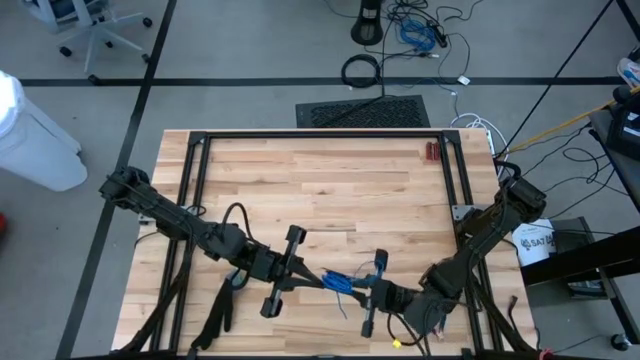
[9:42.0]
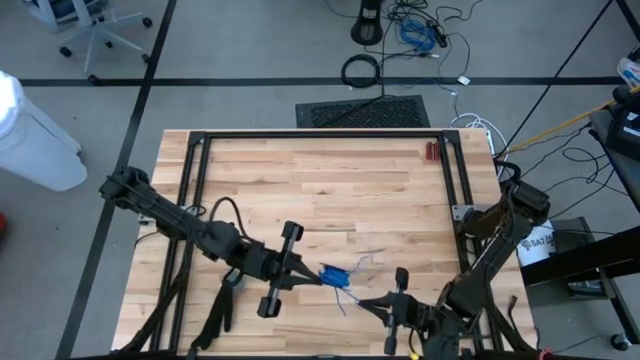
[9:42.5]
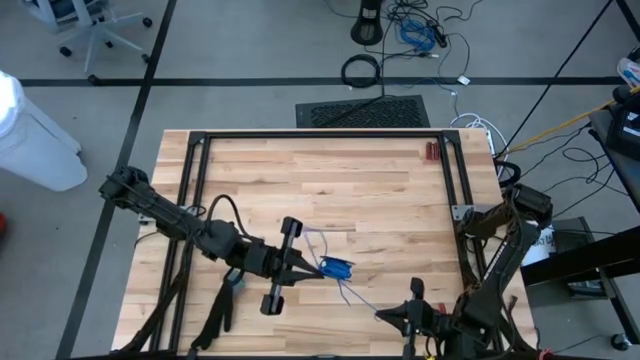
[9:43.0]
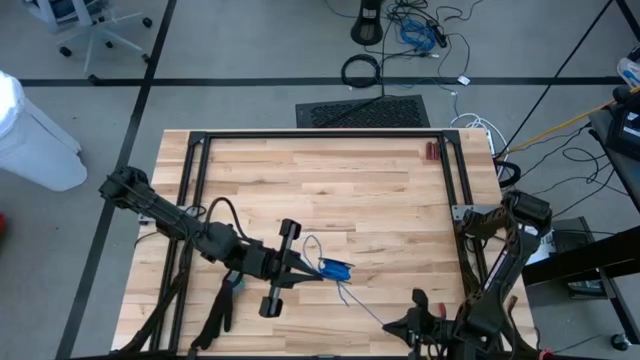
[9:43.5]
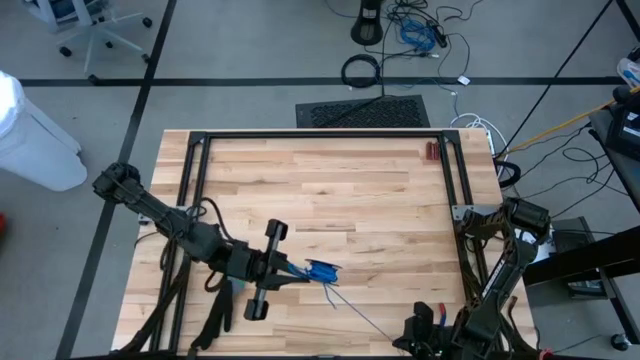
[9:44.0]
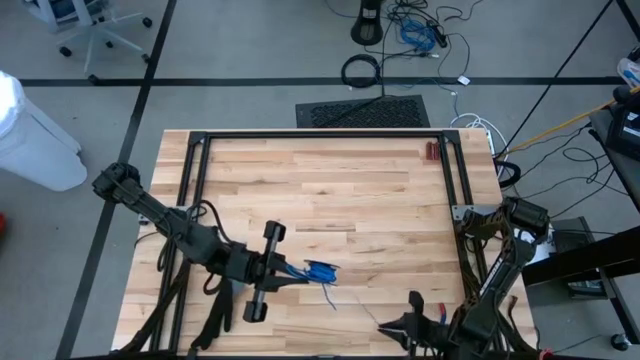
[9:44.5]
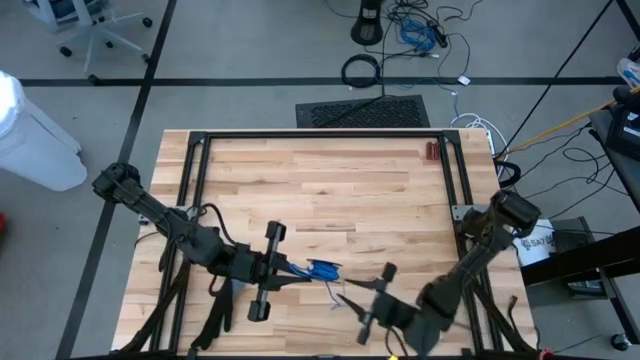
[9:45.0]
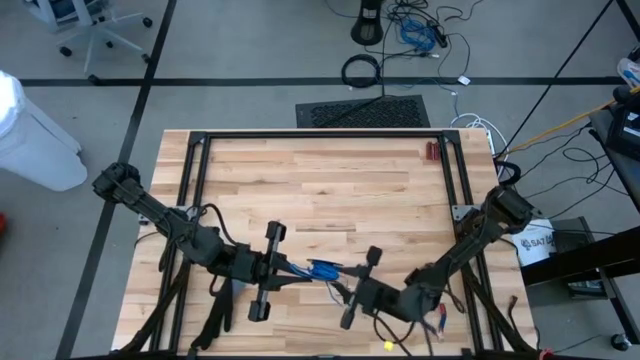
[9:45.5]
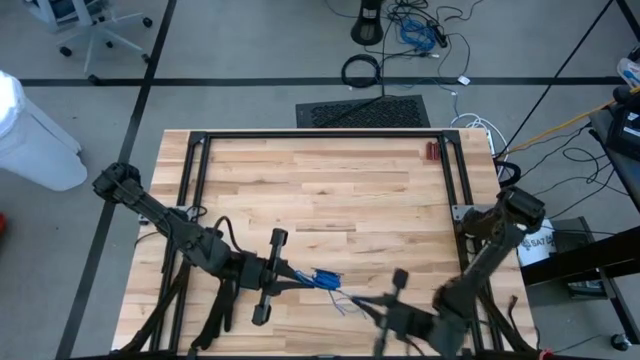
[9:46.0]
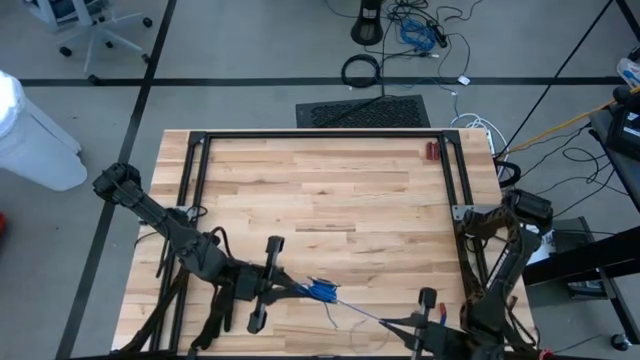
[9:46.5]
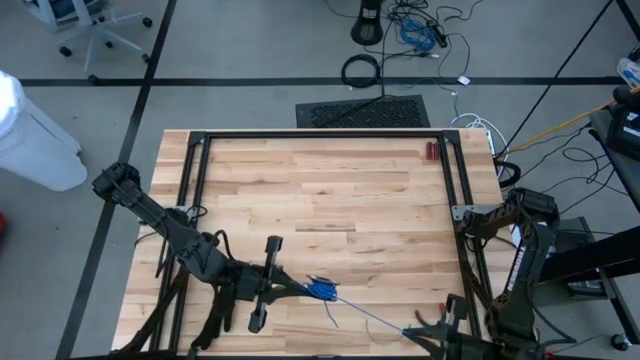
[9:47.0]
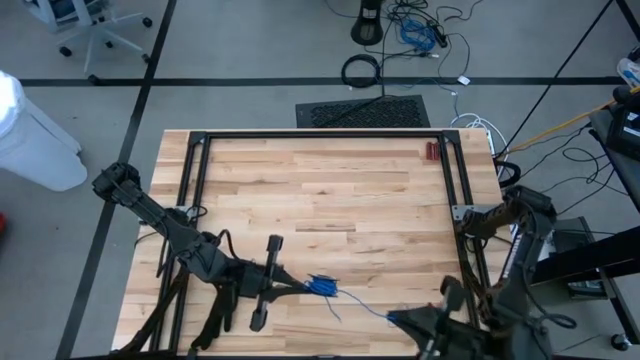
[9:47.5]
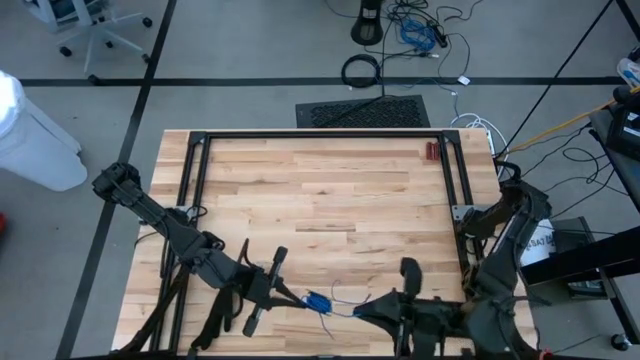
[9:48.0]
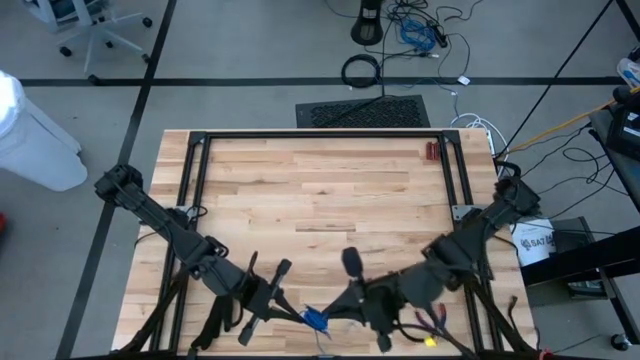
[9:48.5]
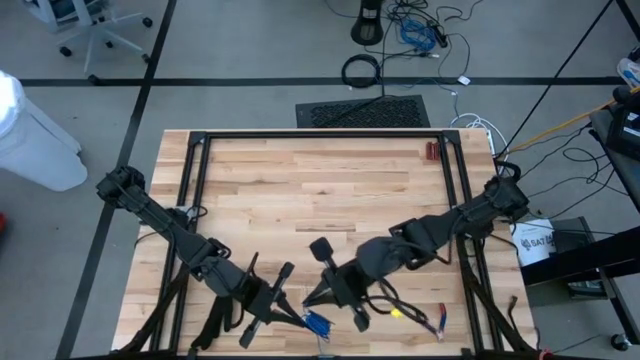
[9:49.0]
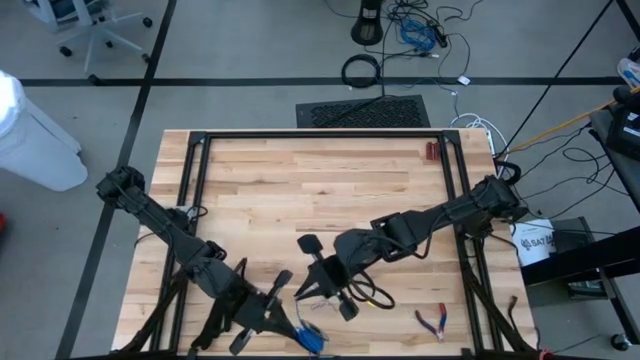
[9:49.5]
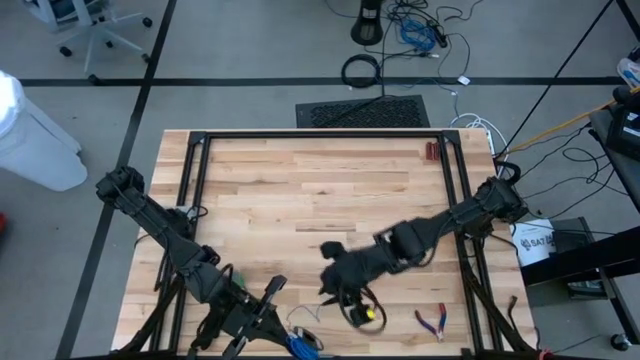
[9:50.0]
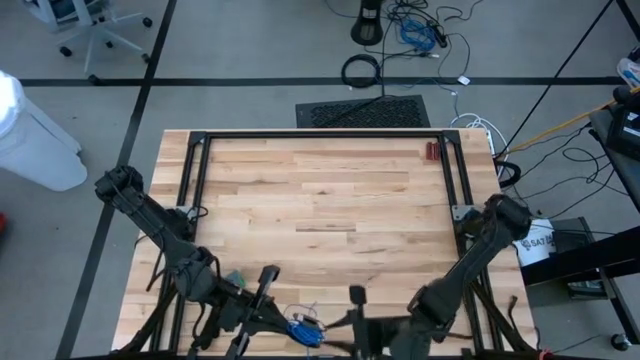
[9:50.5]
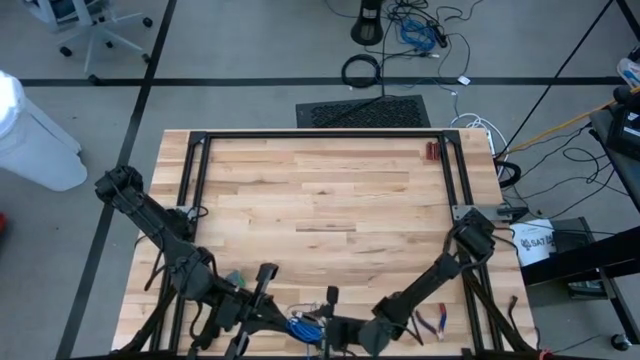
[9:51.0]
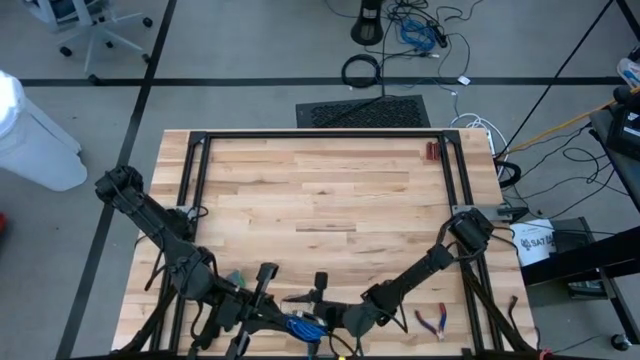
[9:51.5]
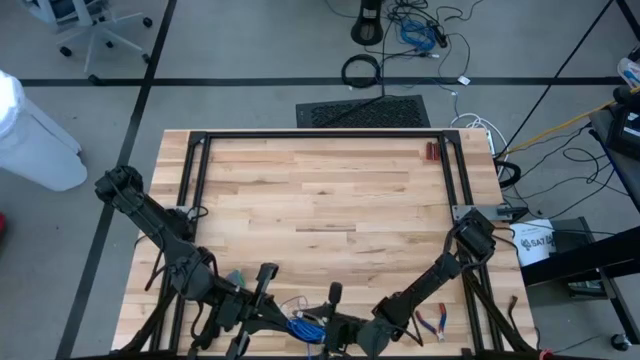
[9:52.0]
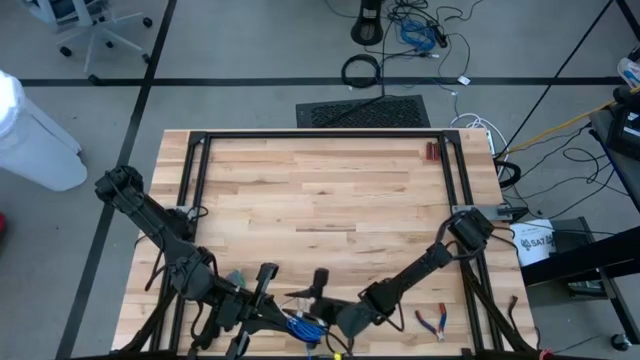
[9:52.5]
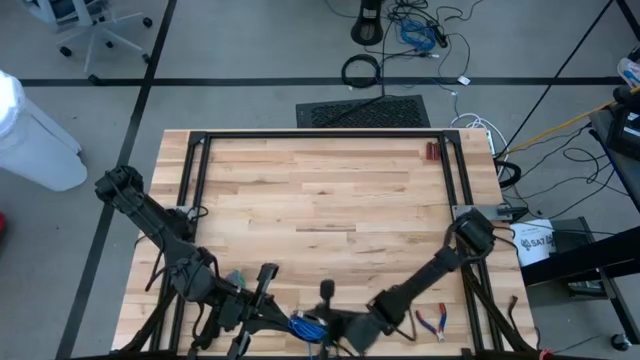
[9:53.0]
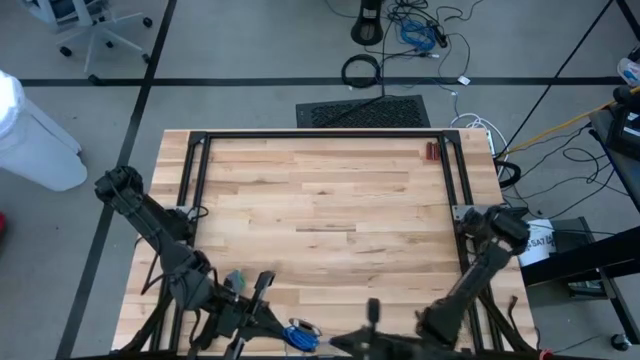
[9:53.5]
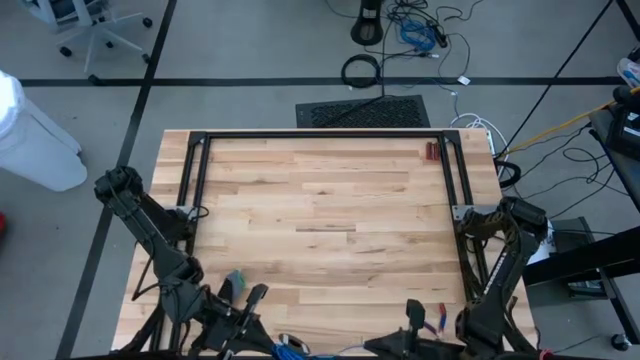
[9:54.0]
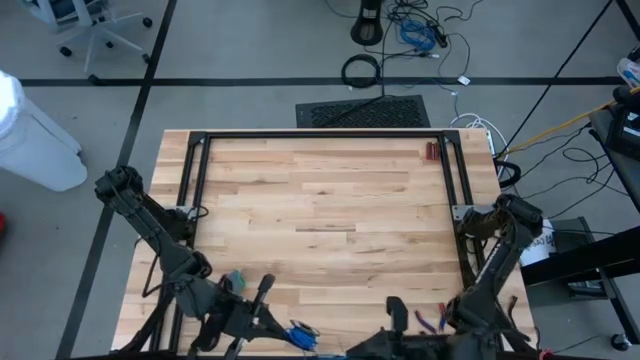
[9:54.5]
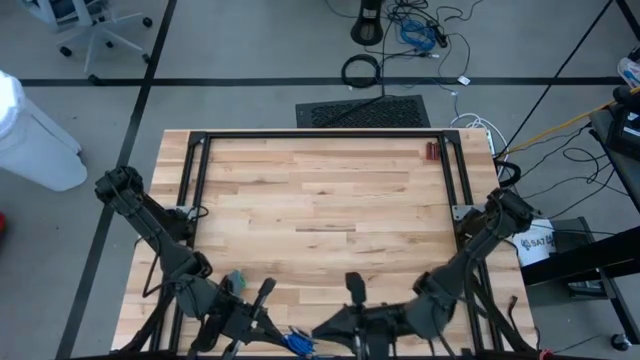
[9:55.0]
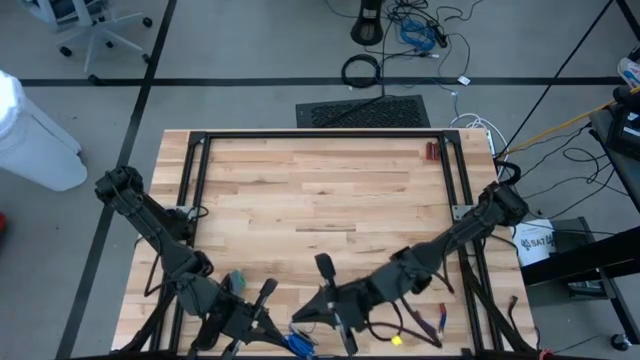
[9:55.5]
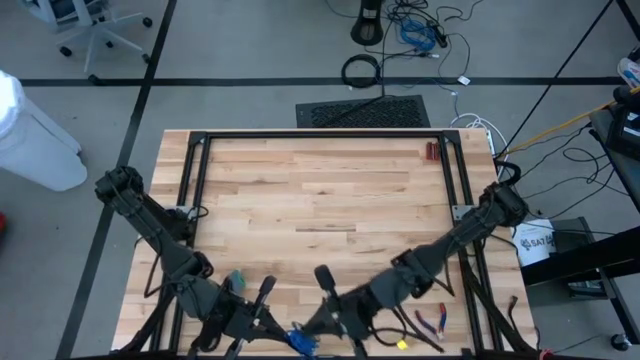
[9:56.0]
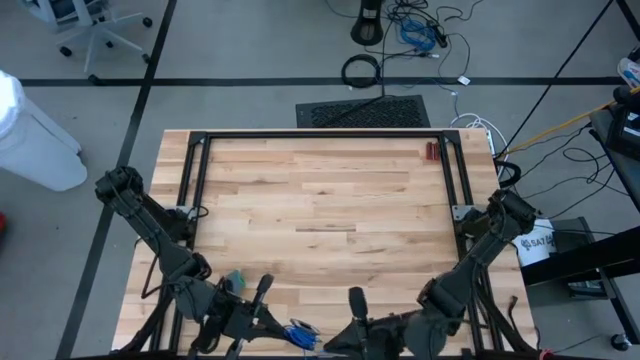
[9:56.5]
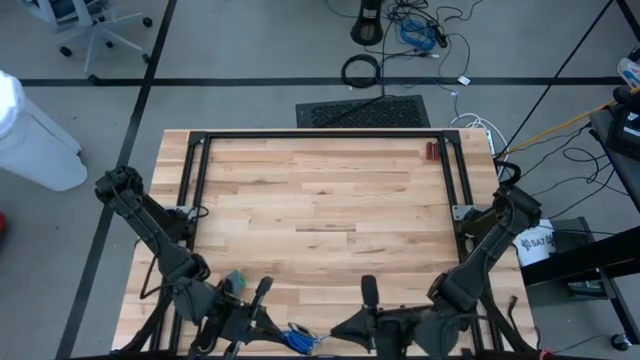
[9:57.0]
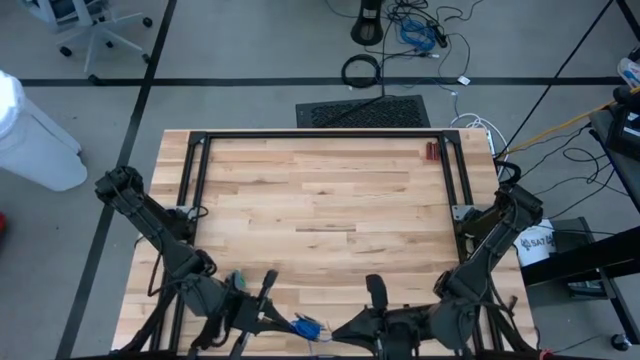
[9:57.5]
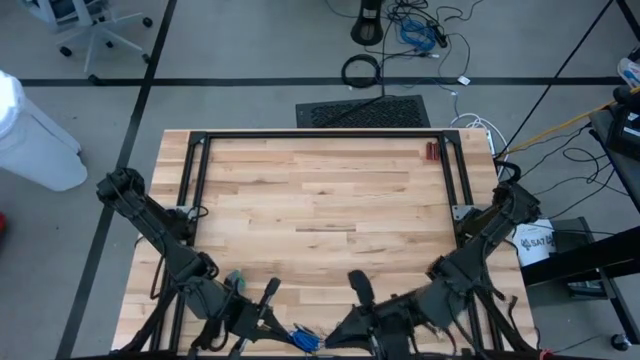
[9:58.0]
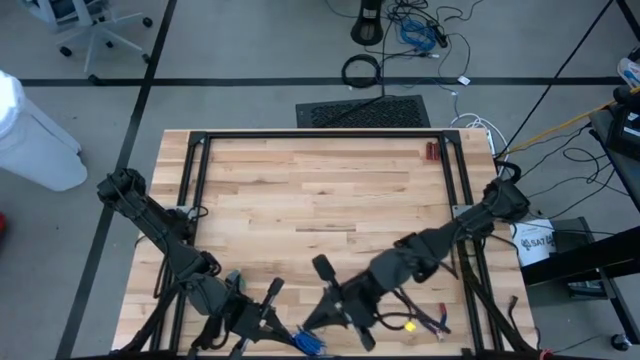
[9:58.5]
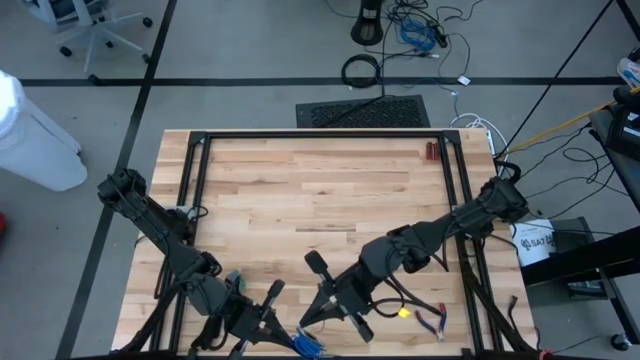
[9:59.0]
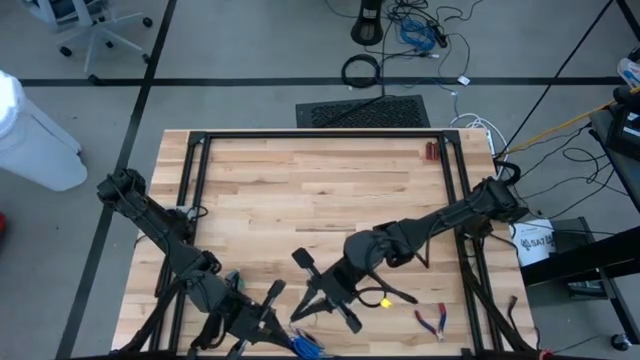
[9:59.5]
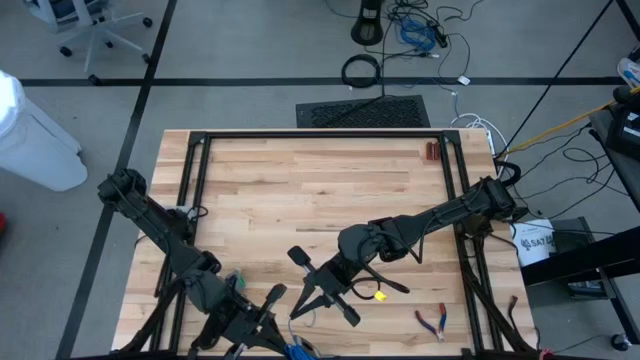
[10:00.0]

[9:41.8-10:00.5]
Task: Coil cords
Coil the blue wire onto the black spool

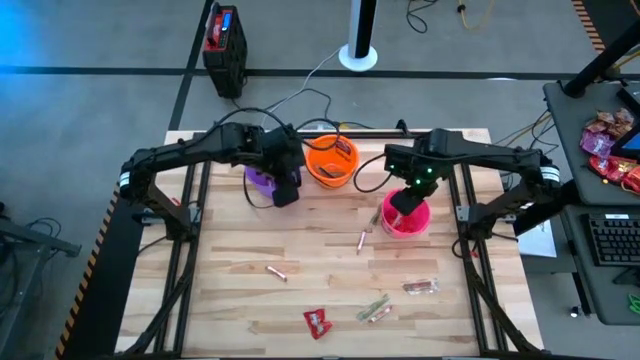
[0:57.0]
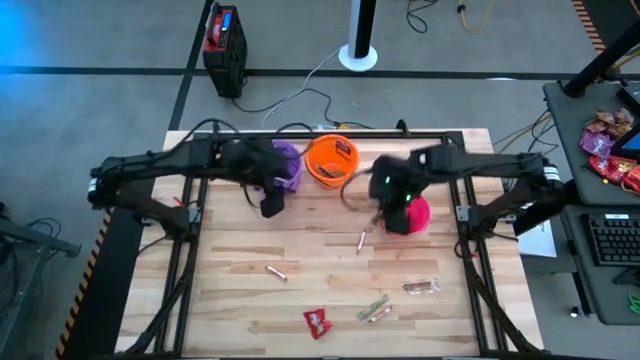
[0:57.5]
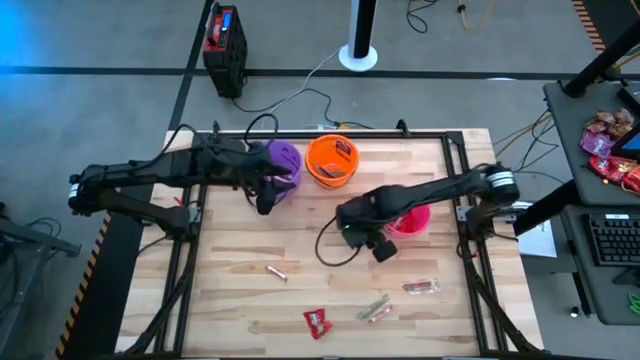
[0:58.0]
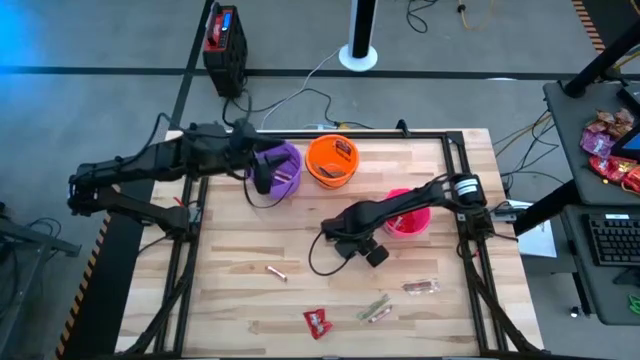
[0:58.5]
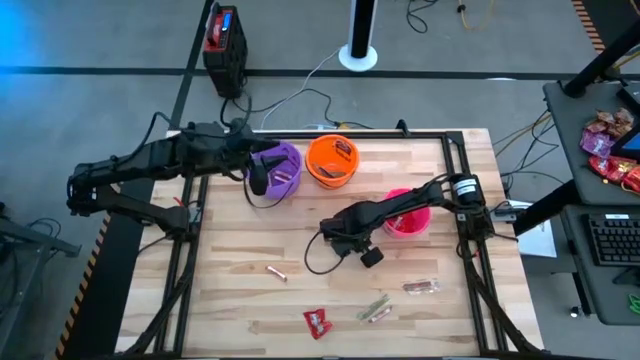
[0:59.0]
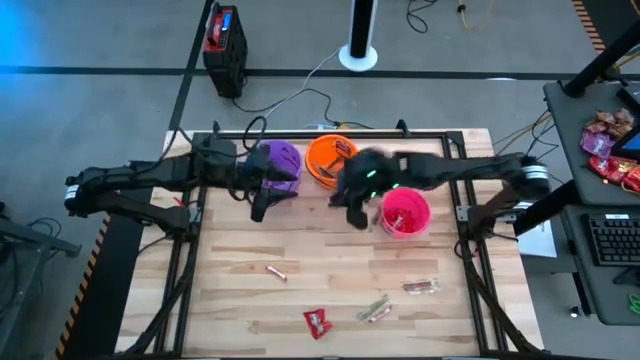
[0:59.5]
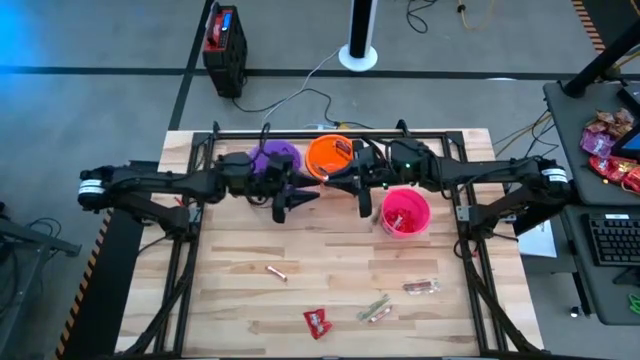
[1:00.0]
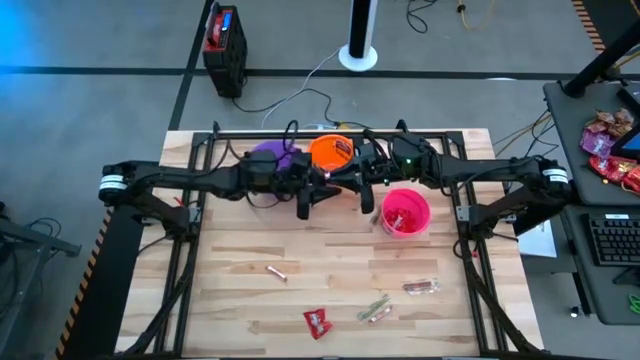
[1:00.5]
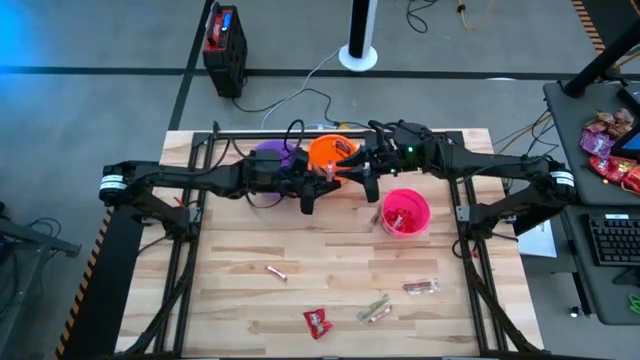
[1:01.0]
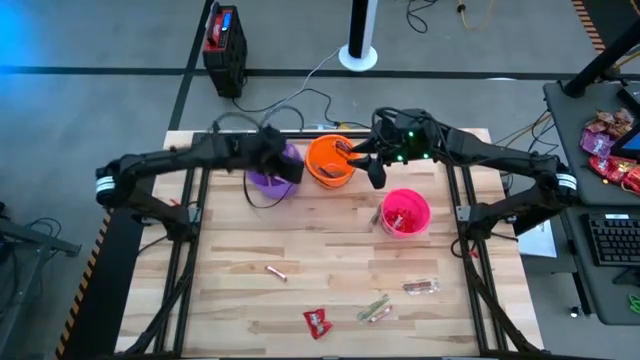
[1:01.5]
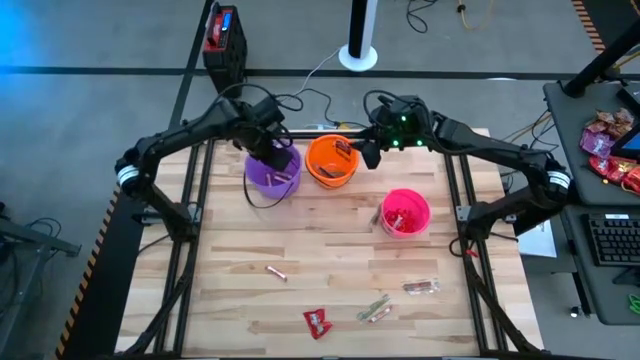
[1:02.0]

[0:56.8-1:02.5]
Task: Sort candy by brand, put in halloween buckets
Put the white candy into the violet bucket
